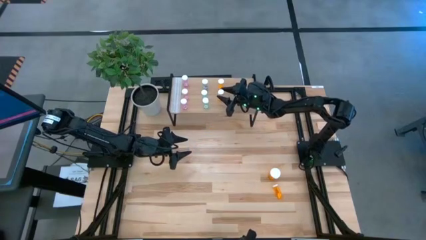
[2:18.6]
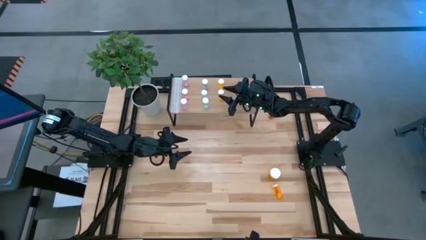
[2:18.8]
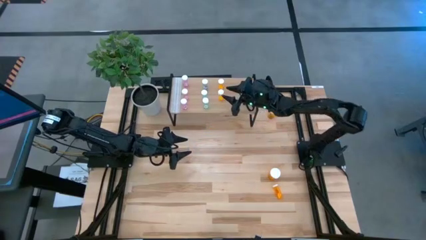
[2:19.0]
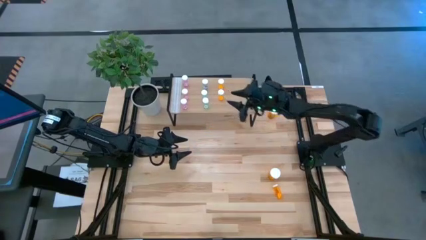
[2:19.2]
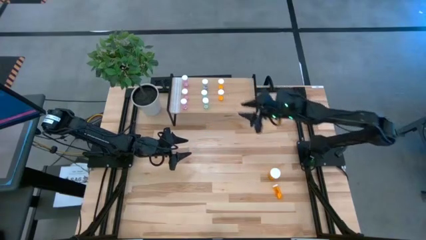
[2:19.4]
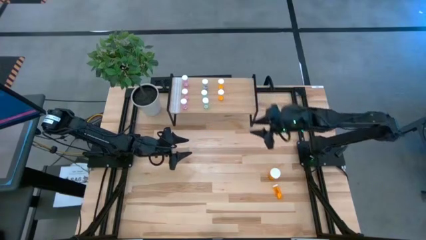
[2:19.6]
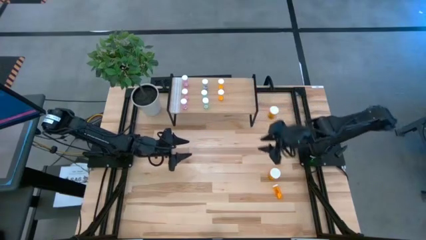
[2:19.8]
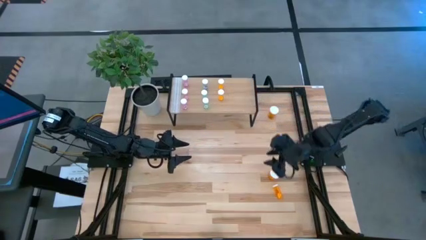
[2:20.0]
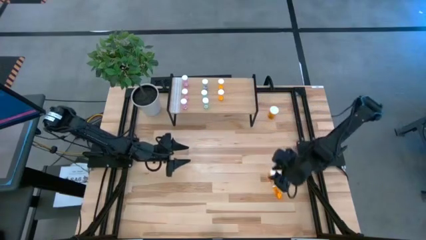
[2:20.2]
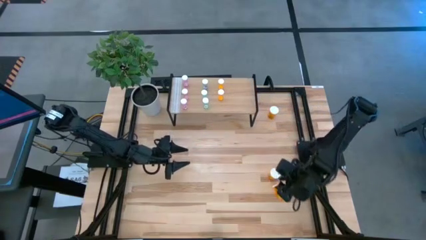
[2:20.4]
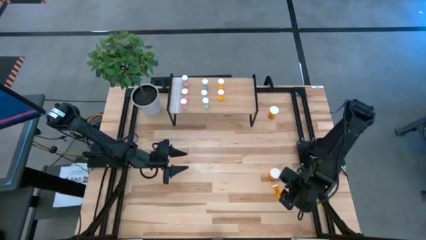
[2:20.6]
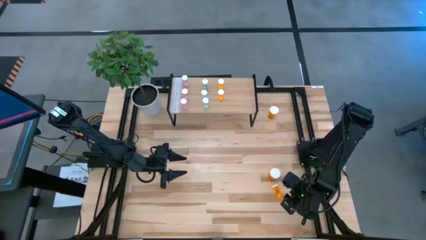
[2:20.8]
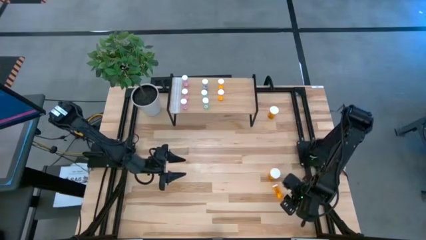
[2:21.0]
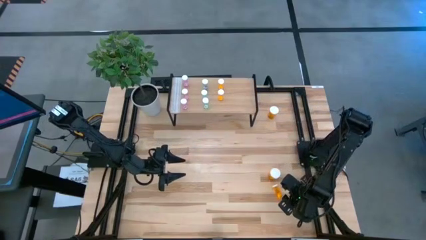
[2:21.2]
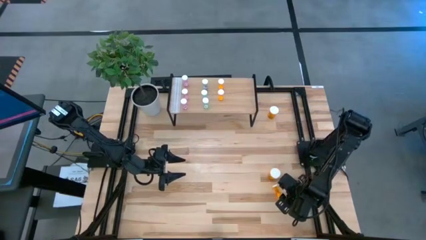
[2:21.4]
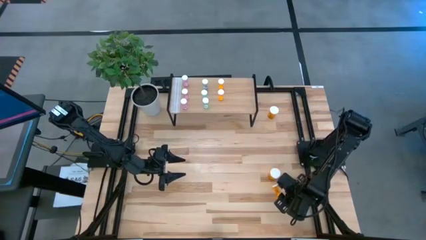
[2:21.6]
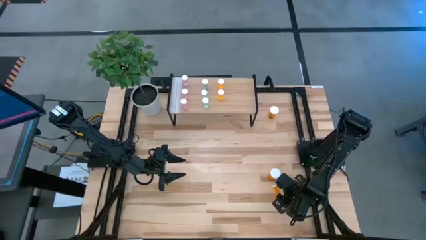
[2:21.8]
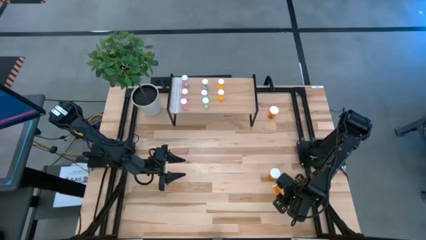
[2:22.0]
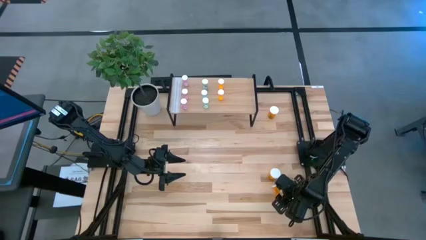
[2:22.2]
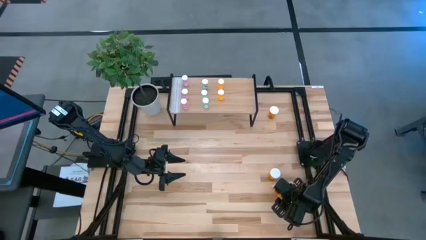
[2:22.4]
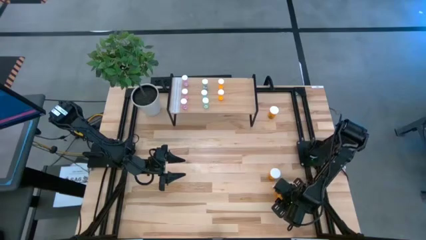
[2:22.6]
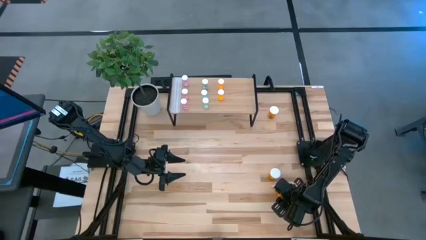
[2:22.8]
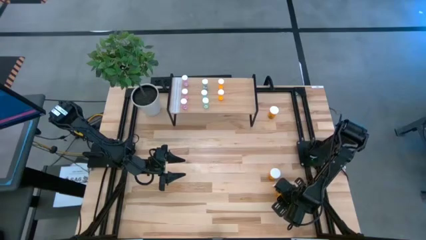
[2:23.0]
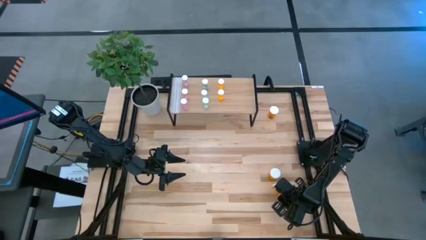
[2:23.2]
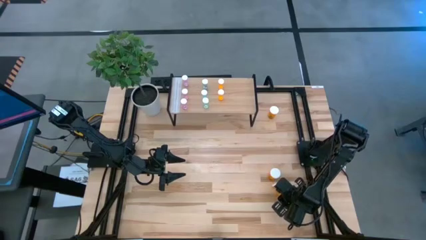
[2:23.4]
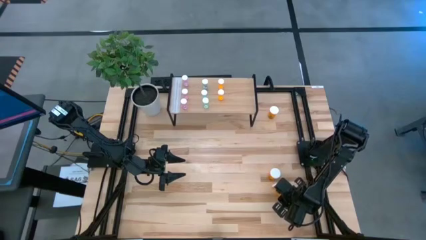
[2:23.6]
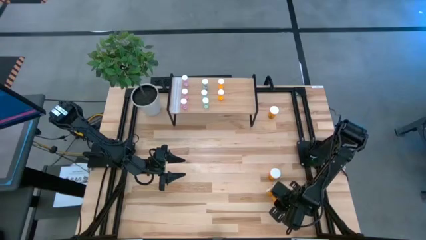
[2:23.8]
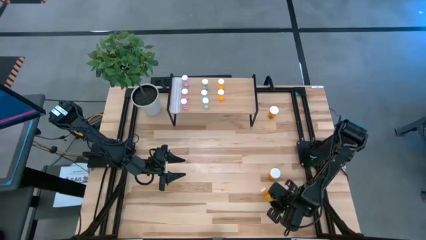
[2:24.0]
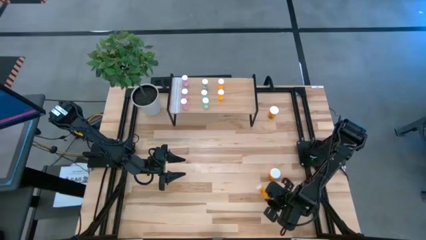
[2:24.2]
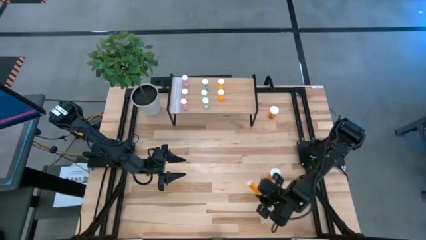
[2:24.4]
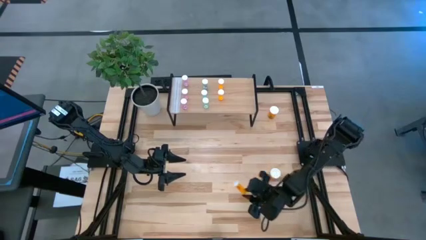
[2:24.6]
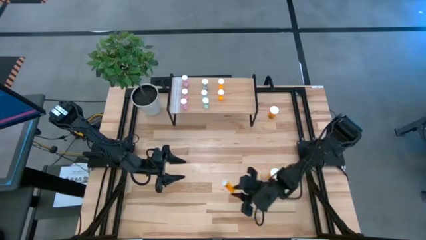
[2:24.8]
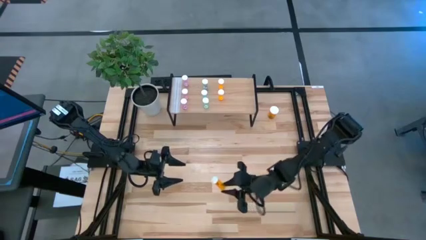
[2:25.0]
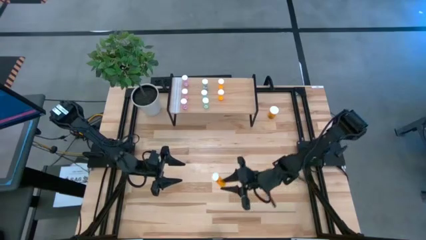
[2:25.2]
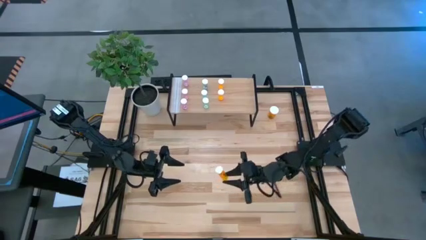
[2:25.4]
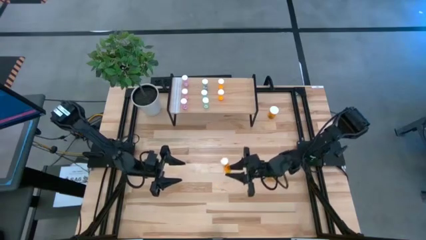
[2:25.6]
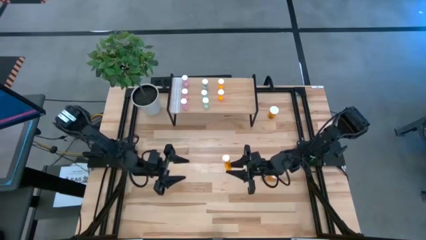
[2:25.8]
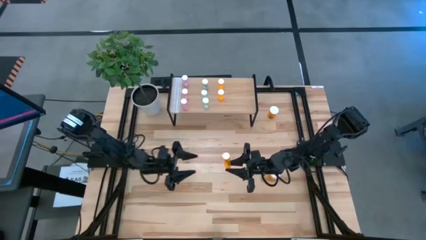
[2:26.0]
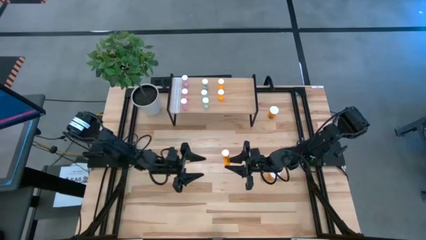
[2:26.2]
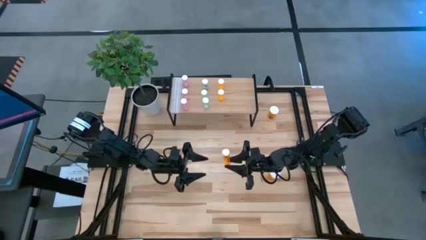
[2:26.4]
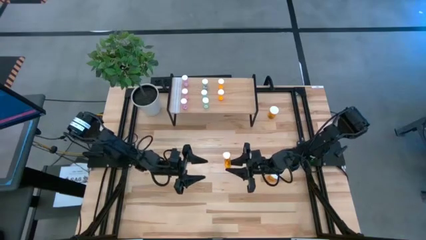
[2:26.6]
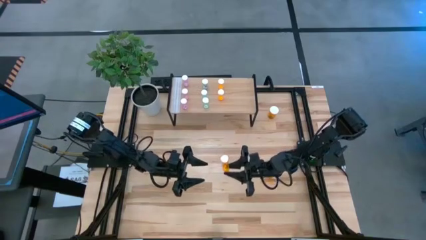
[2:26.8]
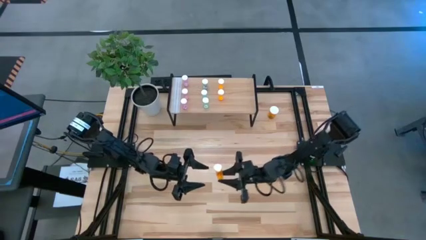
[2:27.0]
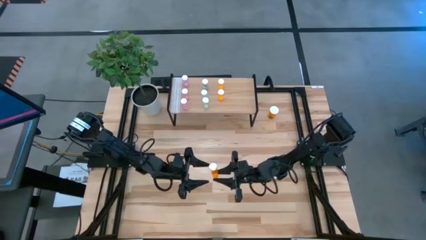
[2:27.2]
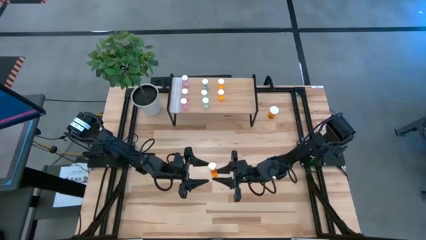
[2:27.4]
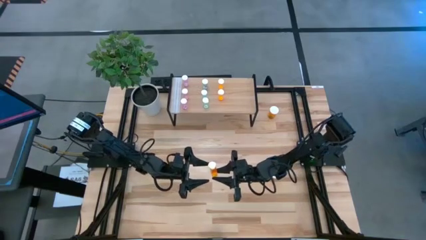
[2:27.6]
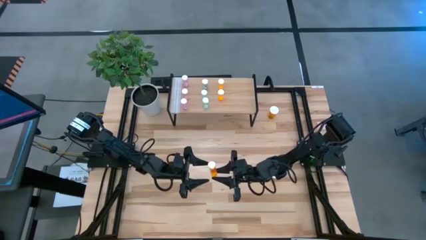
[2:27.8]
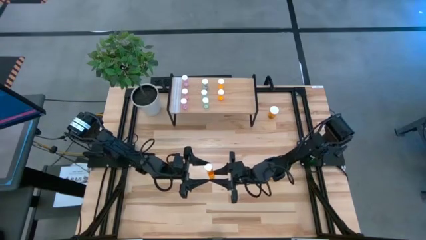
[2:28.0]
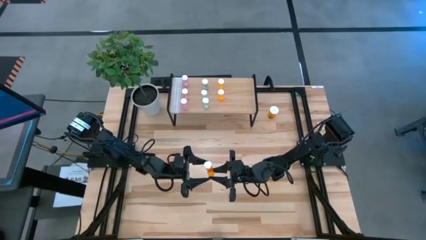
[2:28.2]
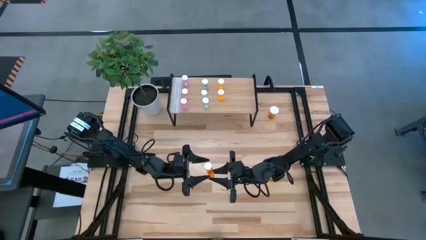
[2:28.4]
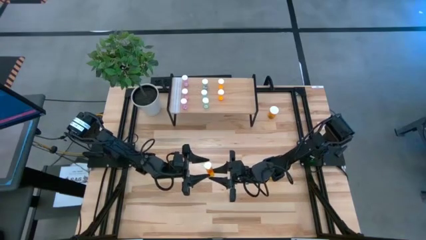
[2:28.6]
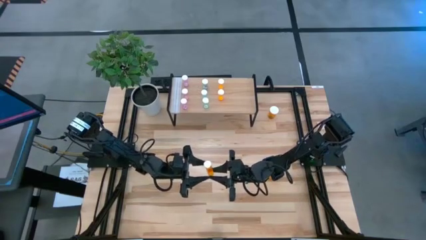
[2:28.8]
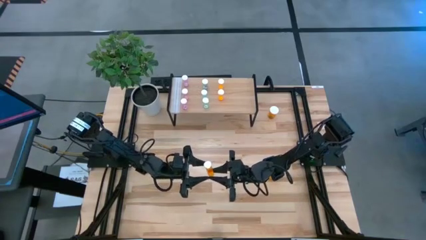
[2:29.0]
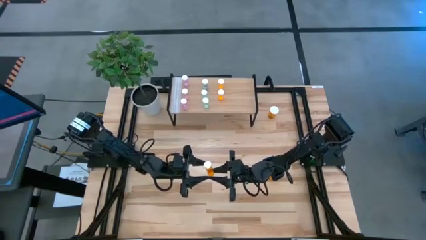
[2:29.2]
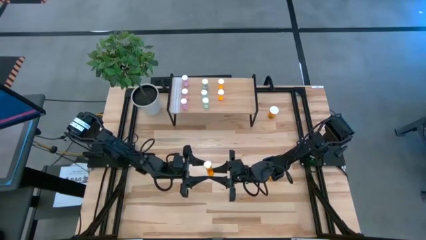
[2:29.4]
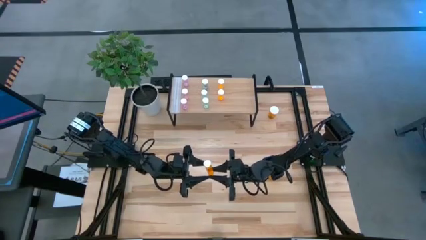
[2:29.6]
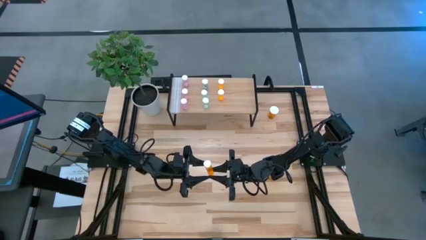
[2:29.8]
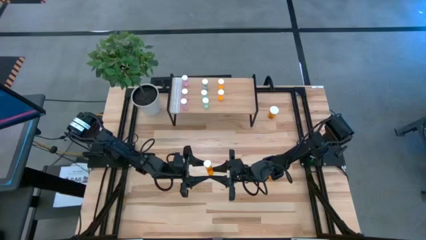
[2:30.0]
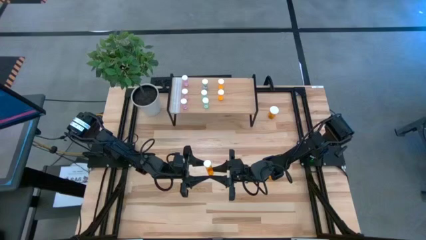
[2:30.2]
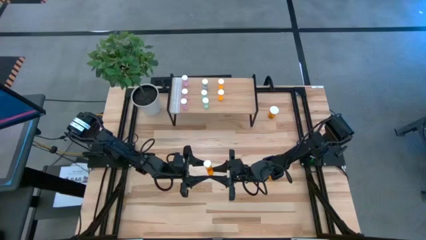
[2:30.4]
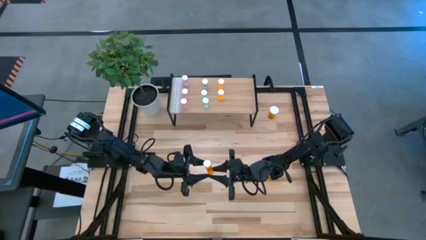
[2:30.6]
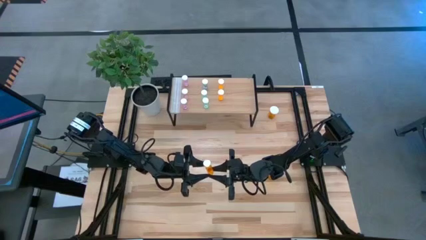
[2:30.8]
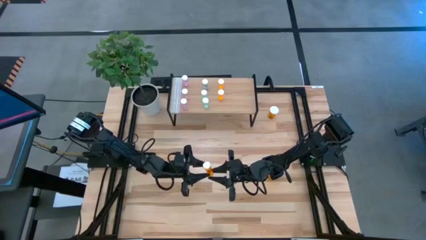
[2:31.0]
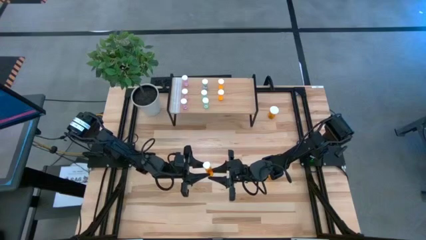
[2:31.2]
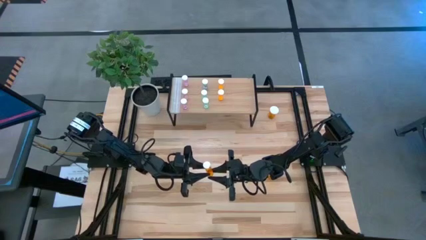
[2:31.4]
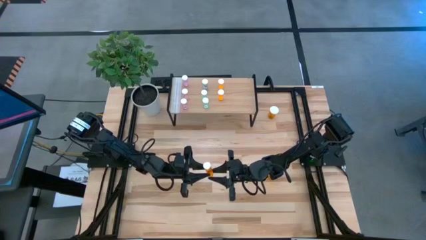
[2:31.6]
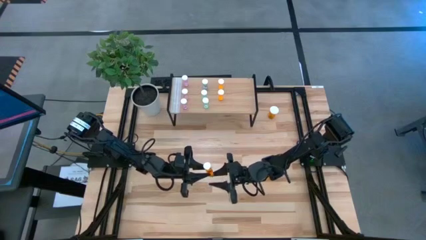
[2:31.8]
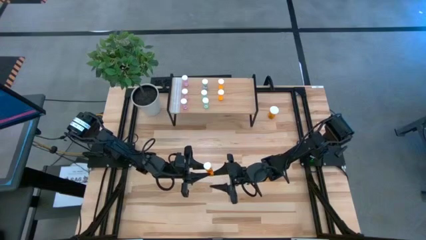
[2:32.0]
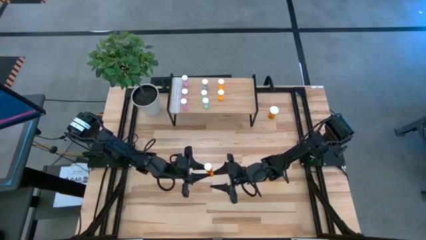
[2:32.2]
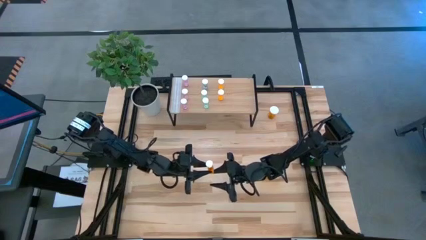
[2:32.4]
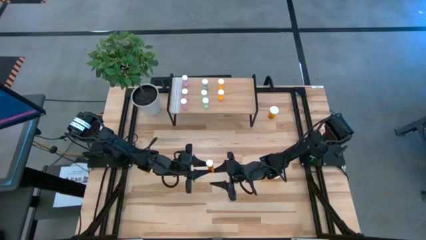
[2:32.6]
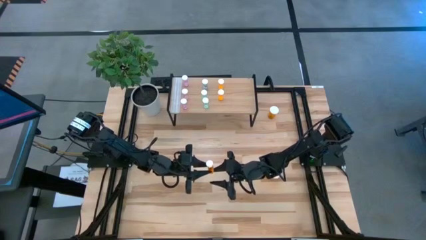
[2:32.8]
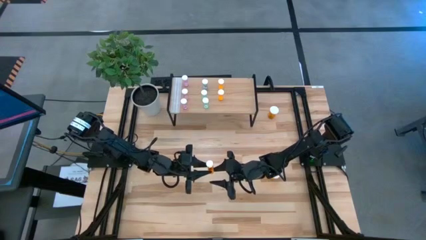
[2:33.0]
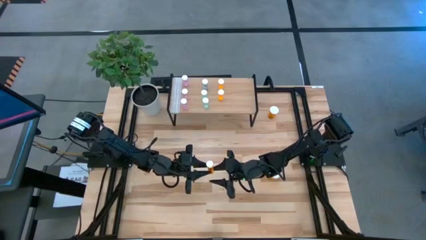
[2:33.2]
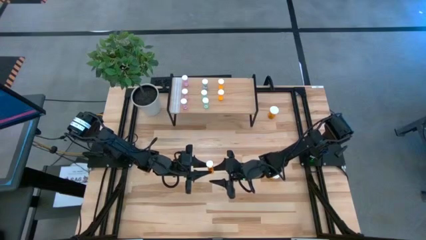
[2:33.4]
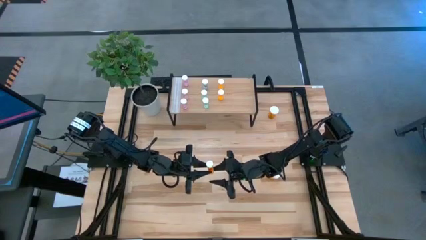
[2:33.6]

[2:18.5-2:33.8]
Task: Pick and place medicine bottles onto shelf by color
Put the small orange pill bottle aligned with the other small orange pill bottles on the shelf
